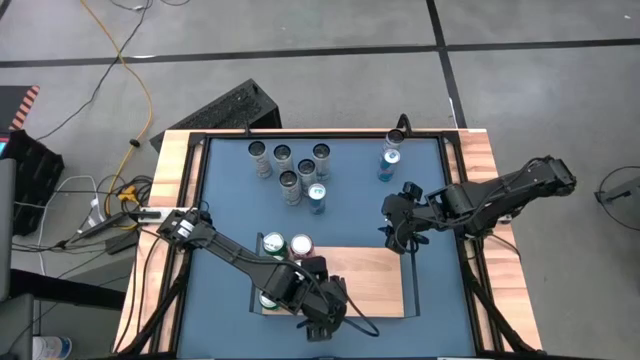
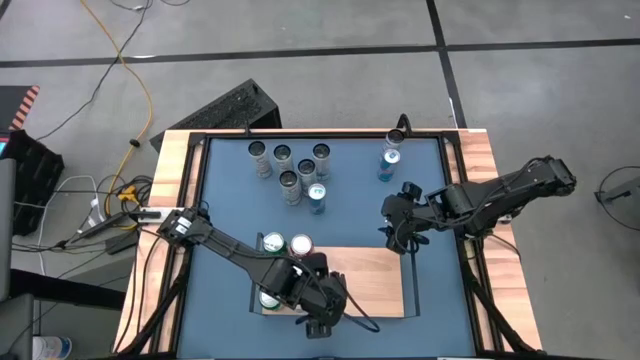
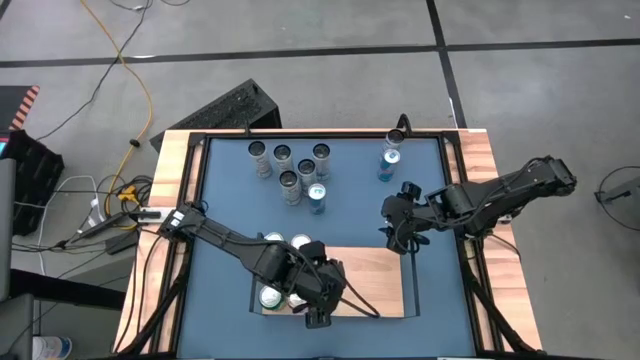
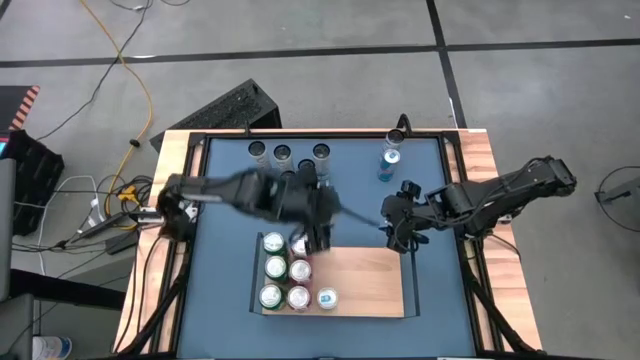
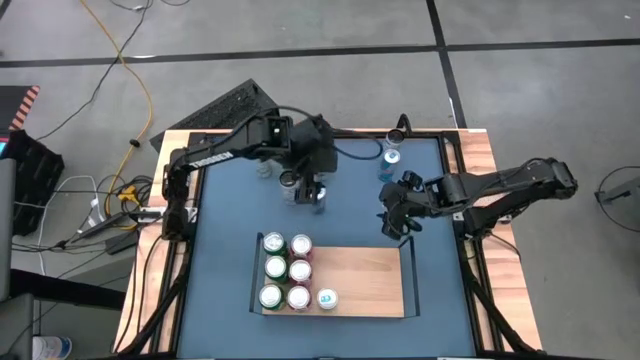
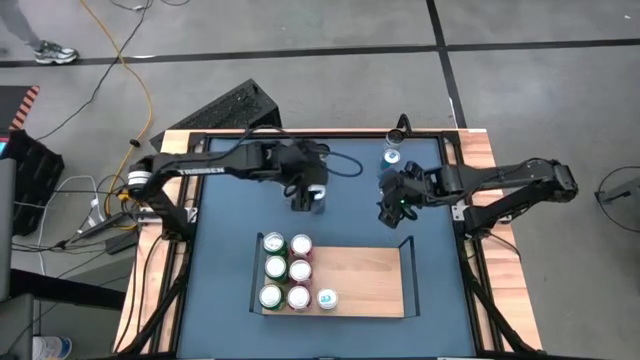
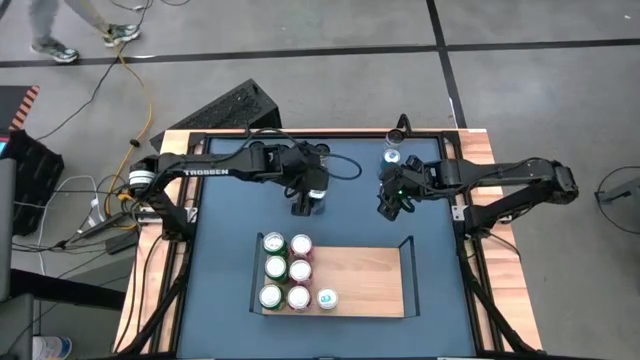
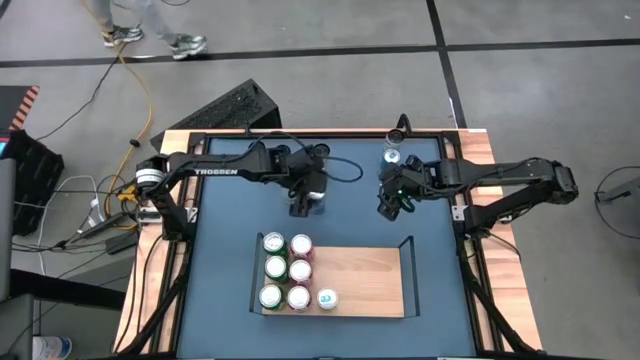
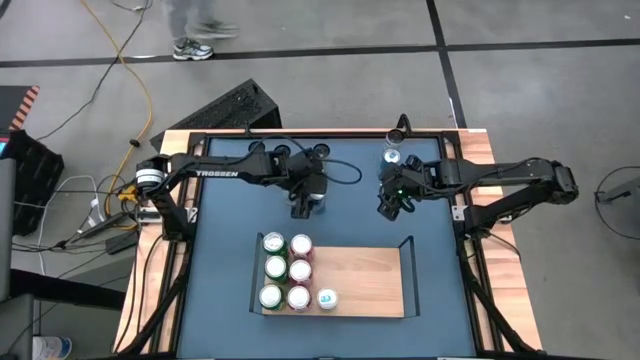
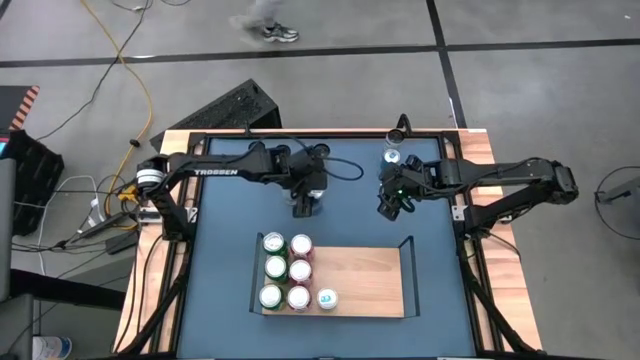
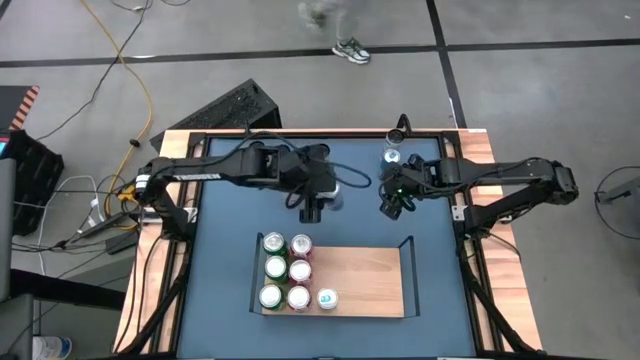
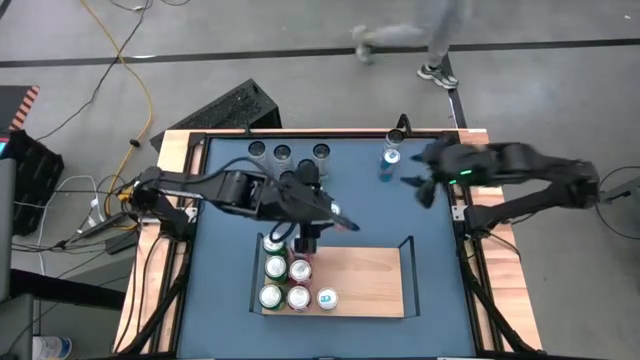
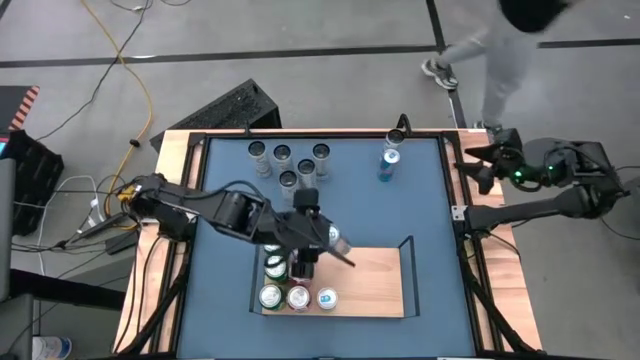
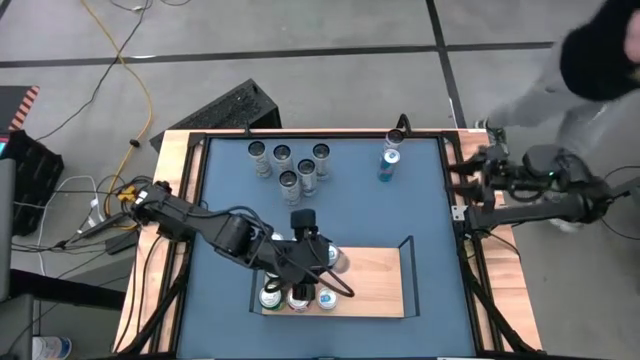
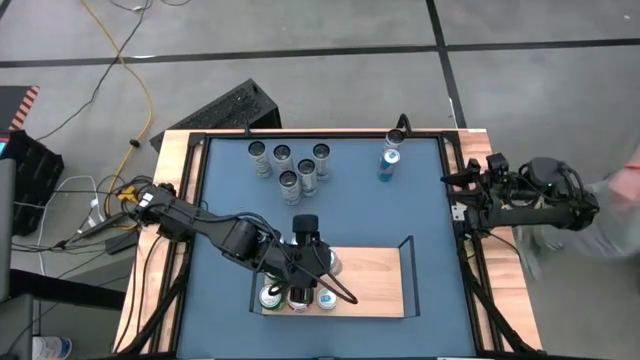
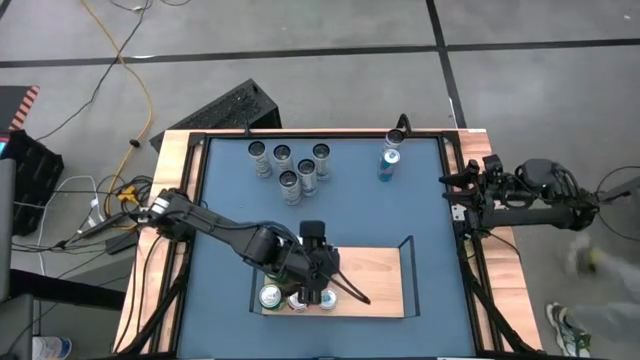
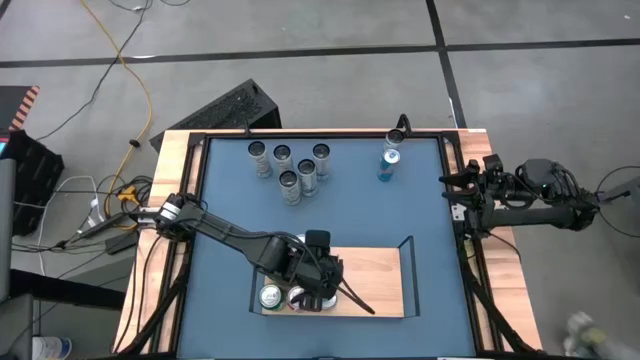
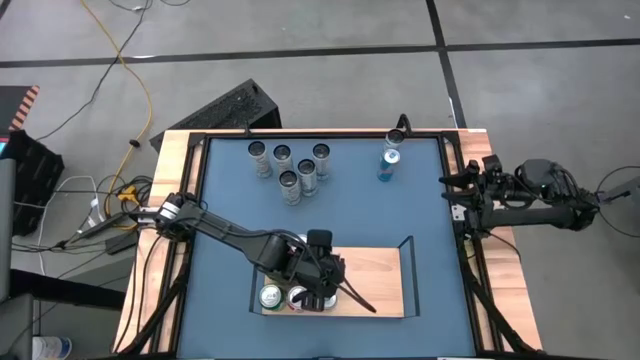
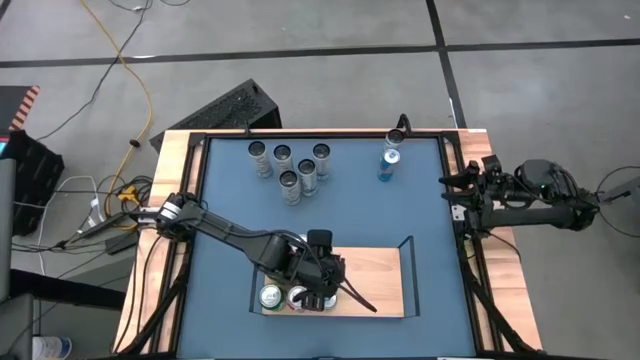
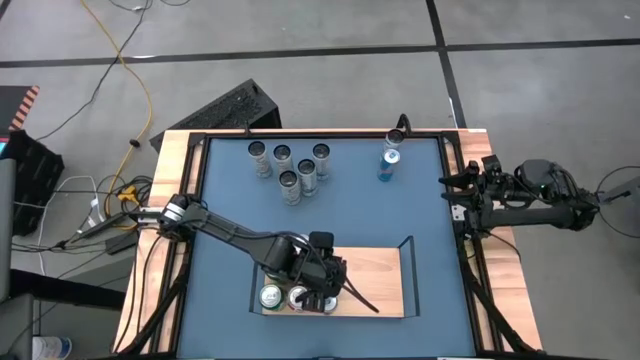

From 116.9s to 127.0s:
Task: Place canned beverage on shelf
Put the bottom blue soda can on the shelf aligned with the other blue soda can

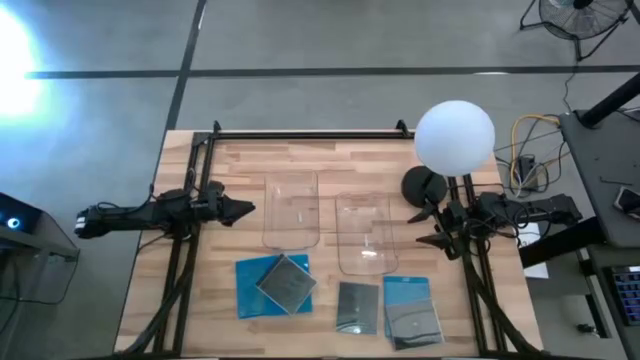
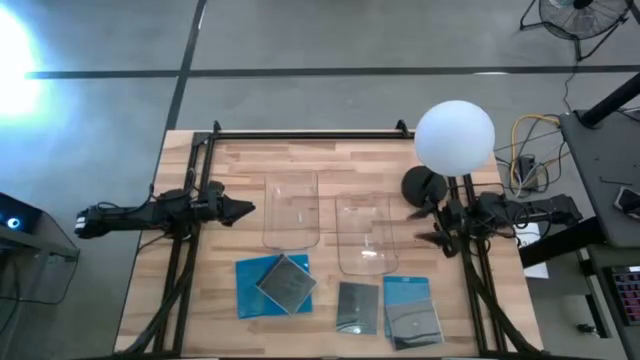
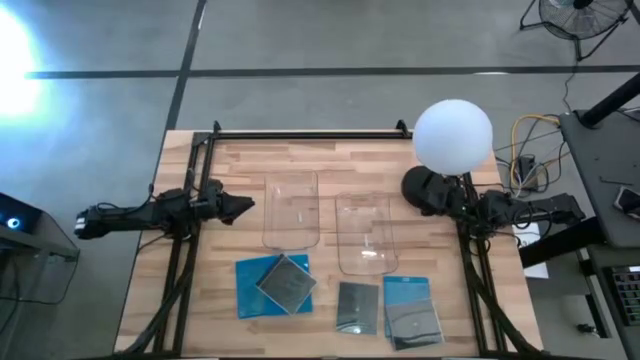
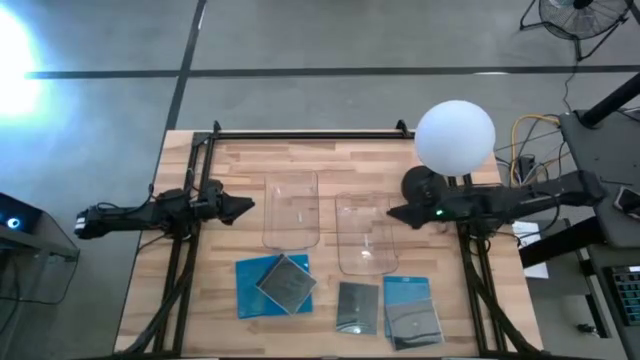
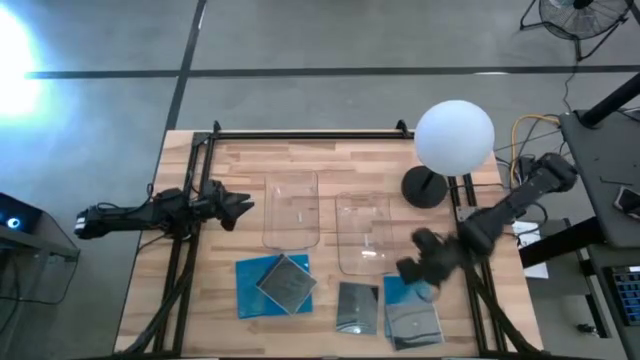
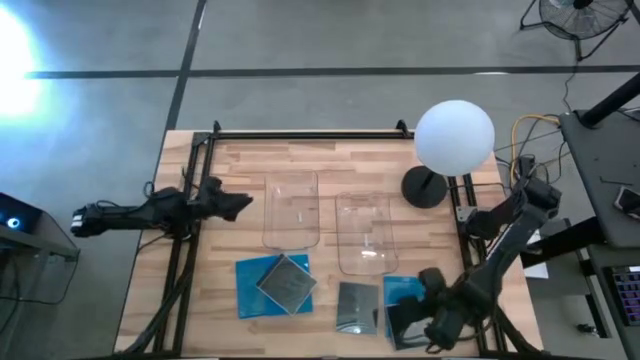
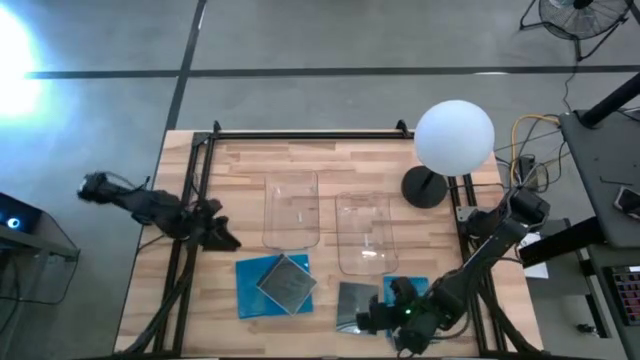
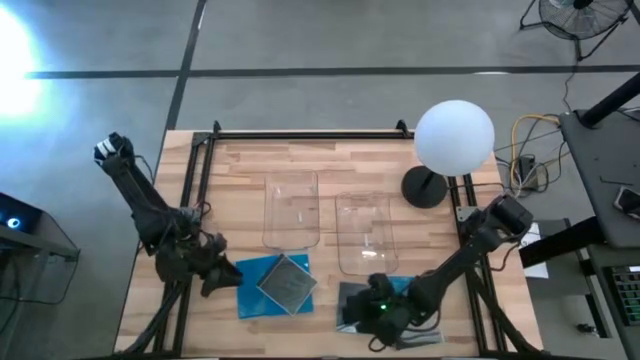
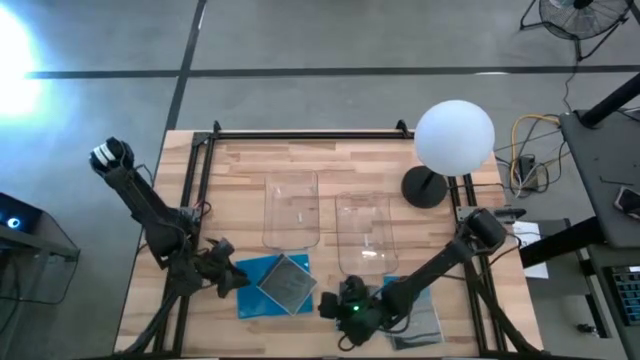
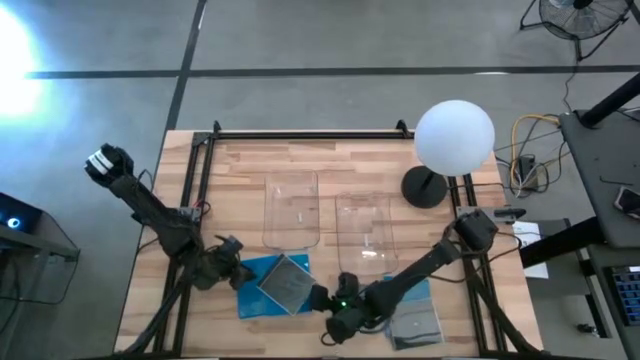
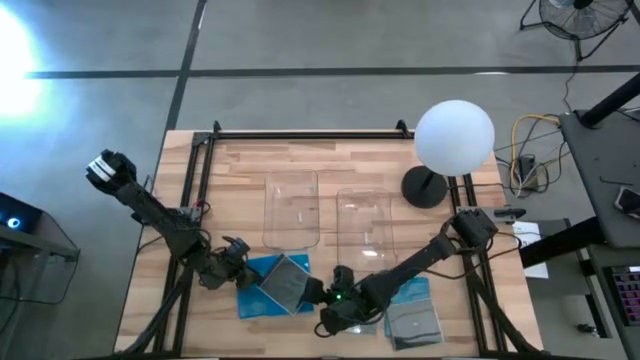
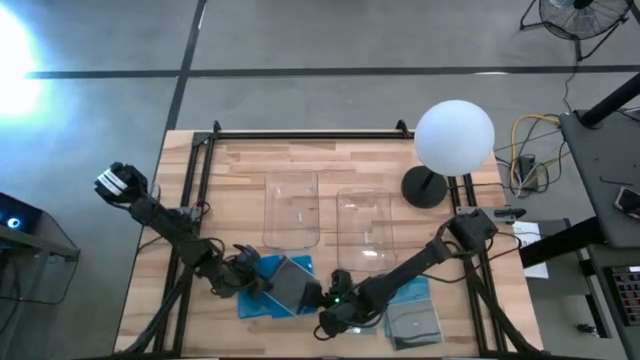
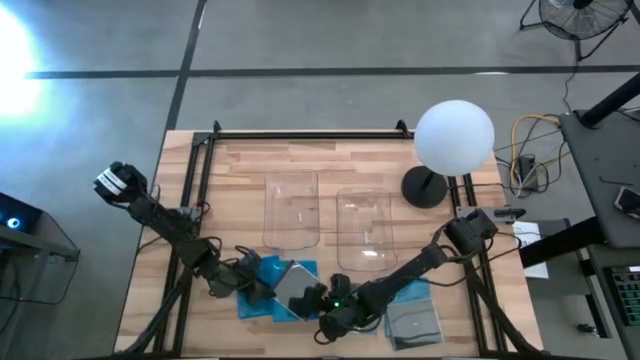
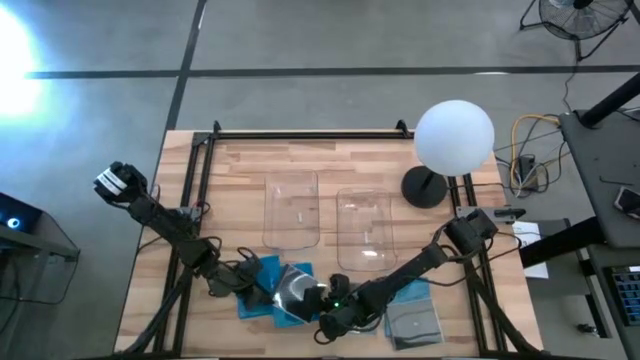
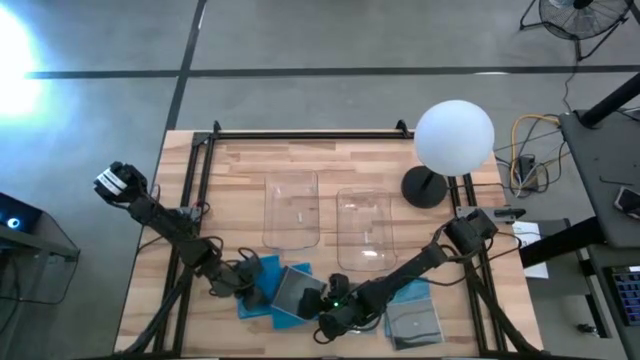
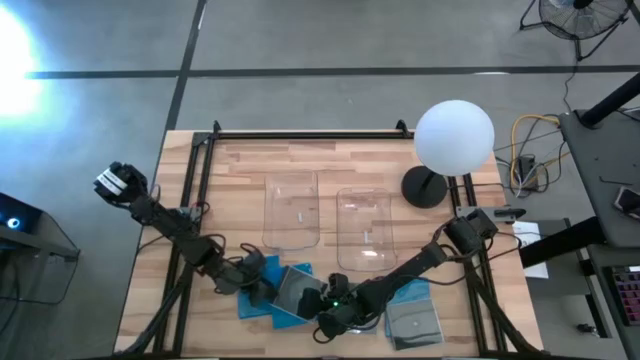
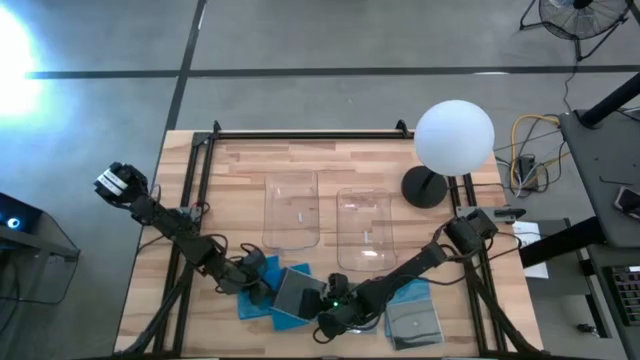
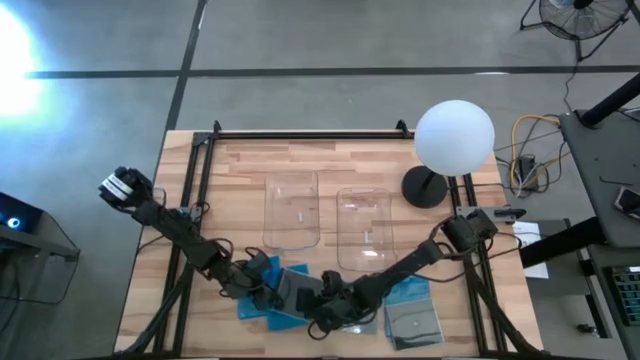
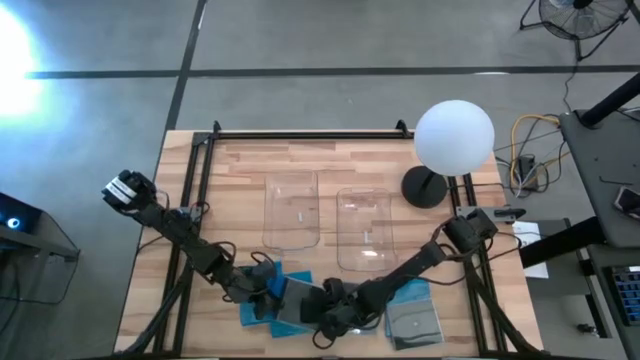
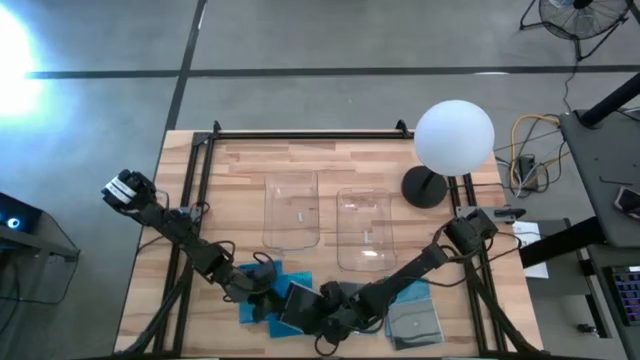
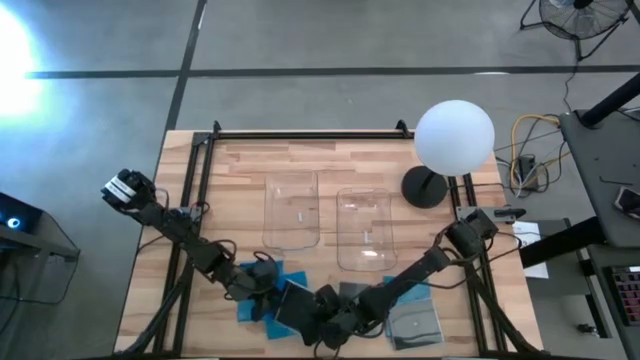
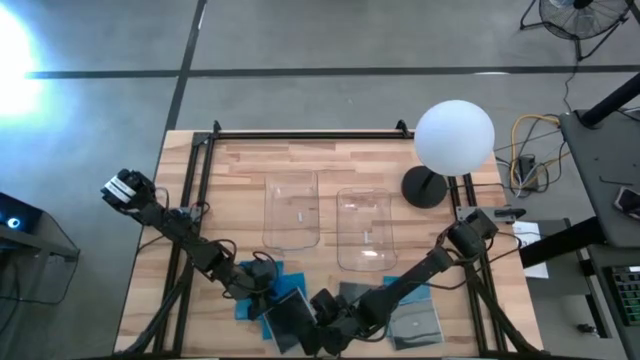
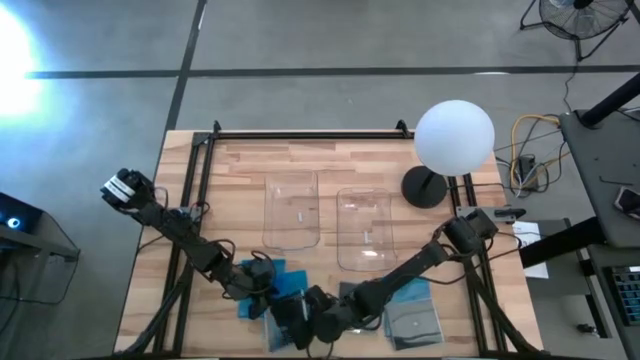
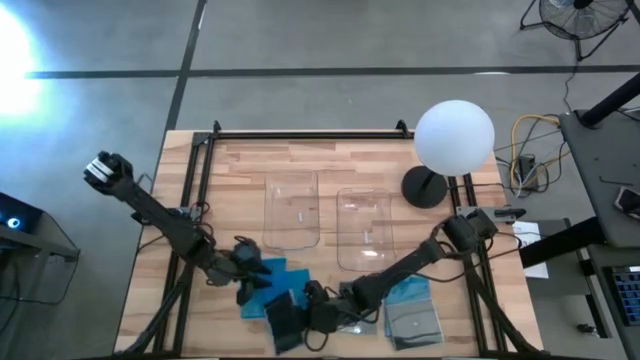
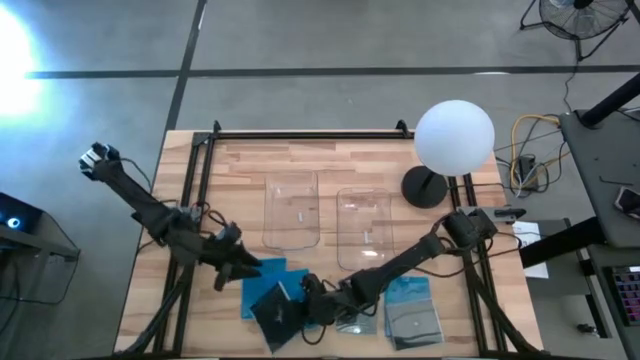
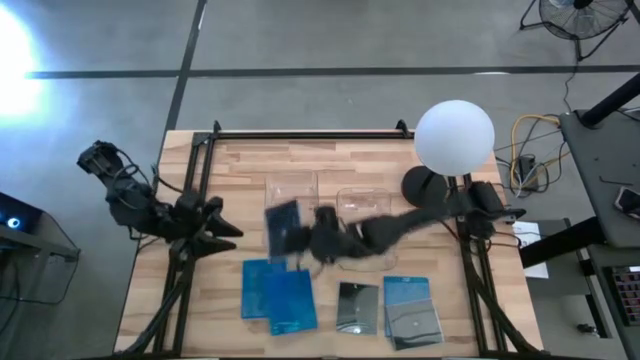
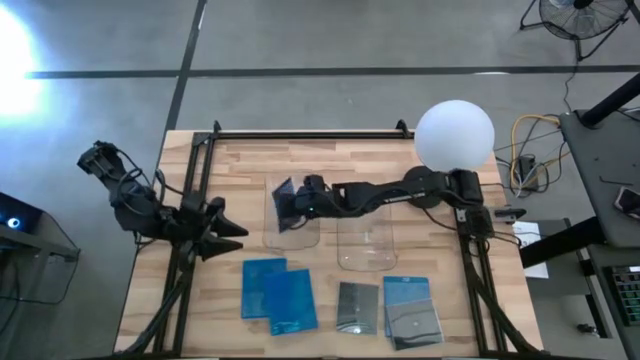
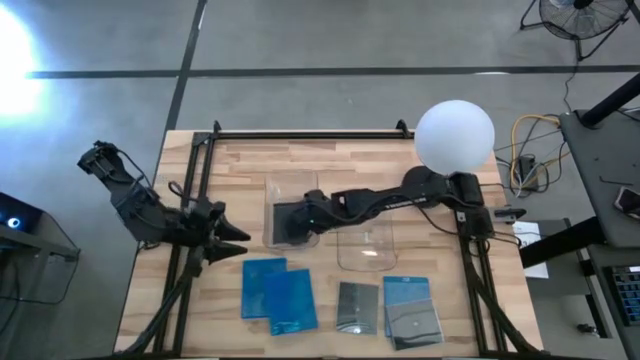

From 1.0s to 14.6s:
Task: Pick & place jewel cases by type
Put the left black cd case into the left transparent bin
